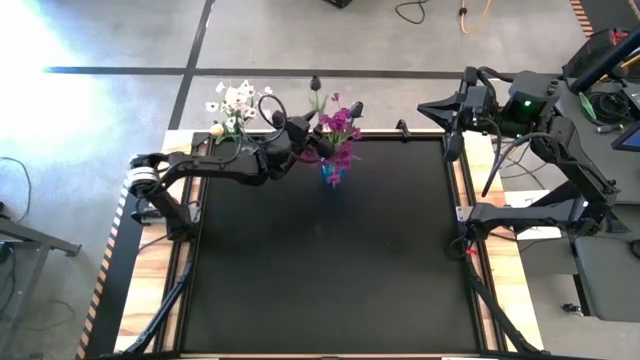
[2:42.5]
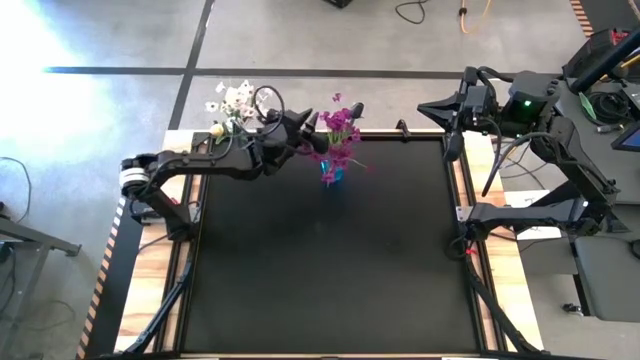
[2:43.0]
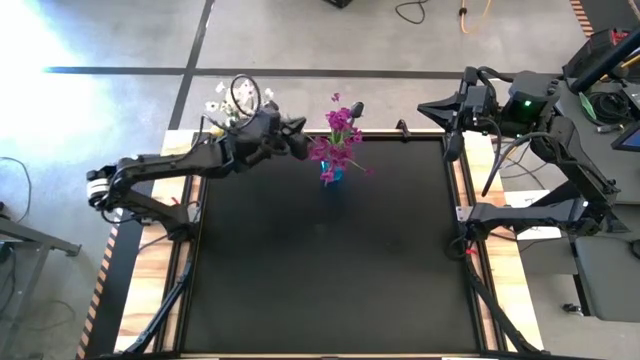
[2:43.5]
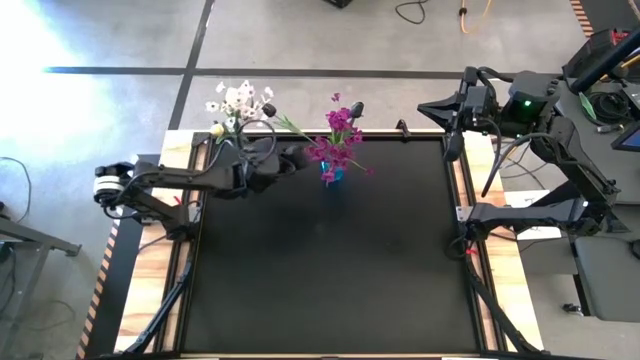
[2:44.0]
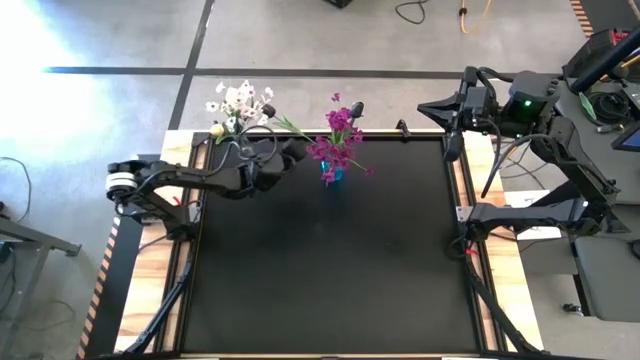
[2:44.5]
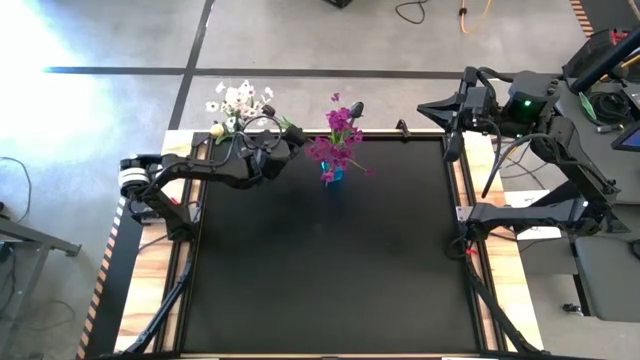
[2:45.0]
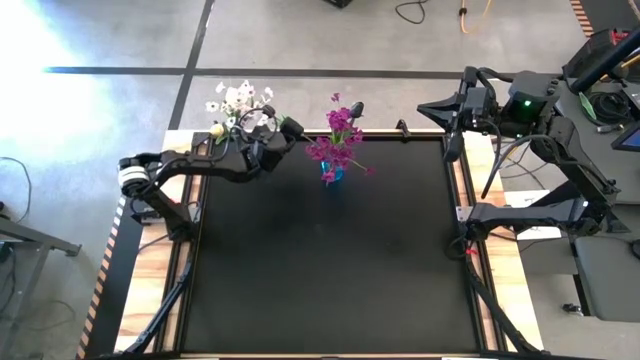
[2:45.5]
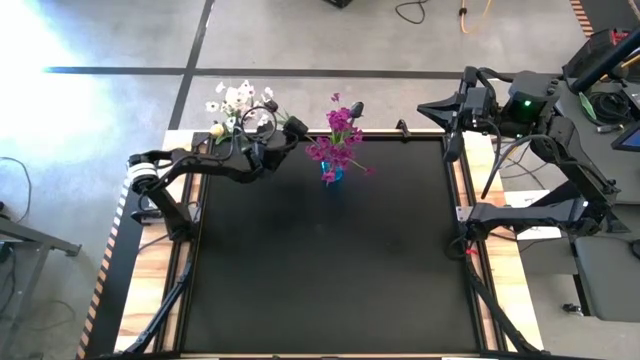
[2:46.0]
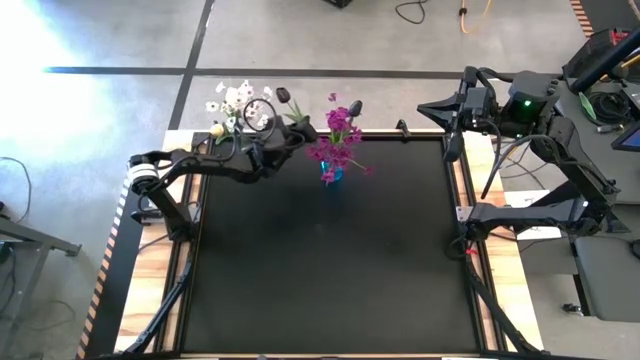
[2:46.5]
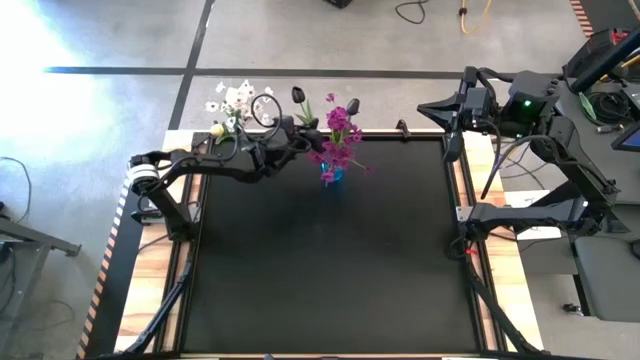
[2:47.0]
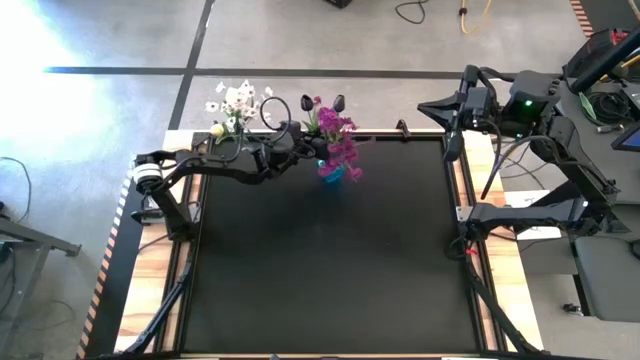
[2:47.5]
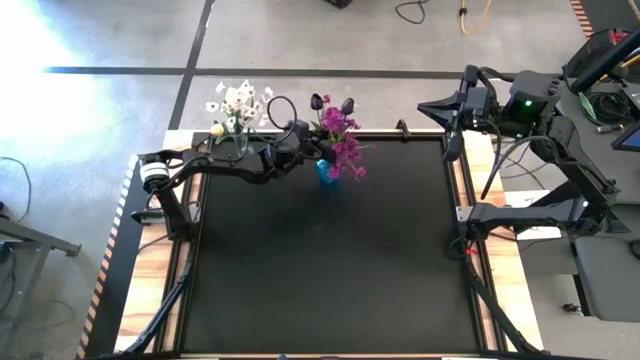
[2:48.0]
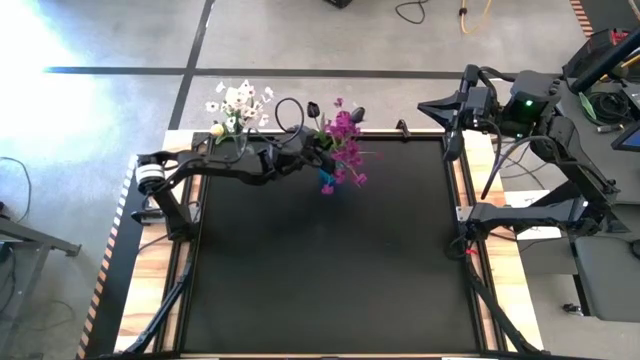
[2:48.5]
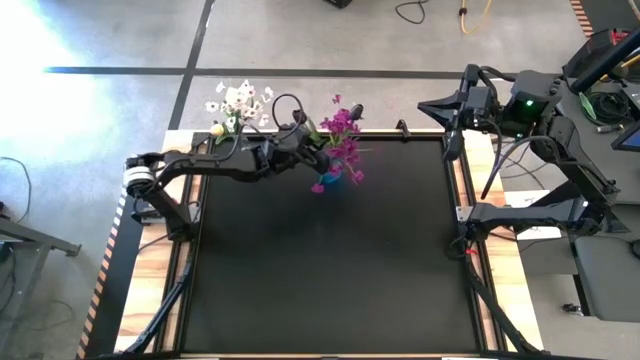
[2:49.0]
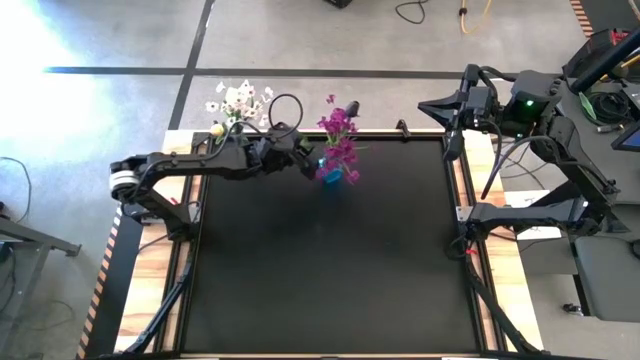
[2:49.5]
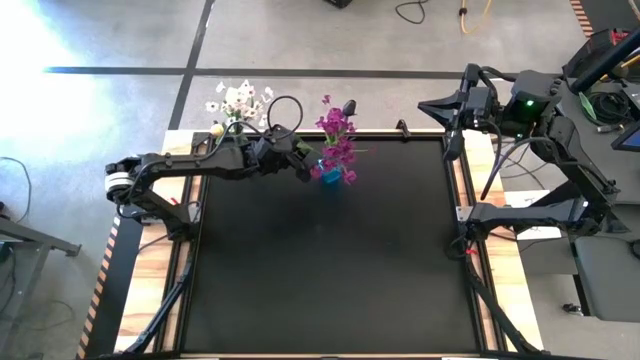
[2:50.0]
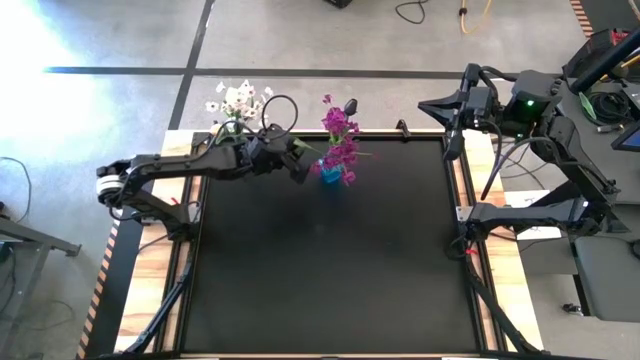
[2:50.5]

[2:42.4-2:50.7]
Task: Sort flowers into vase by color
Put the black flower into the blue vase

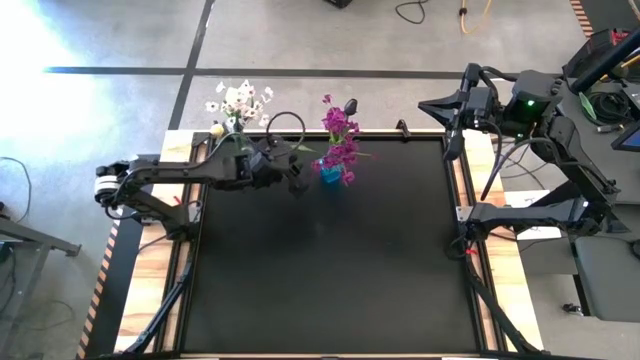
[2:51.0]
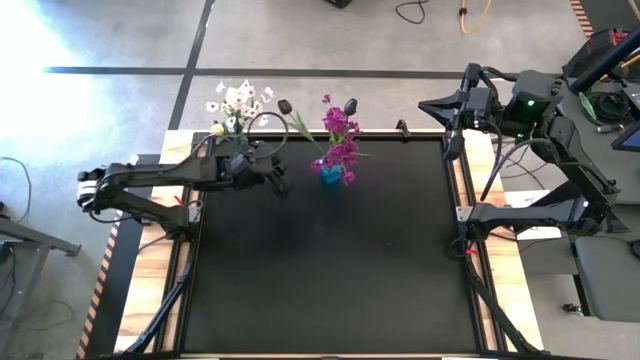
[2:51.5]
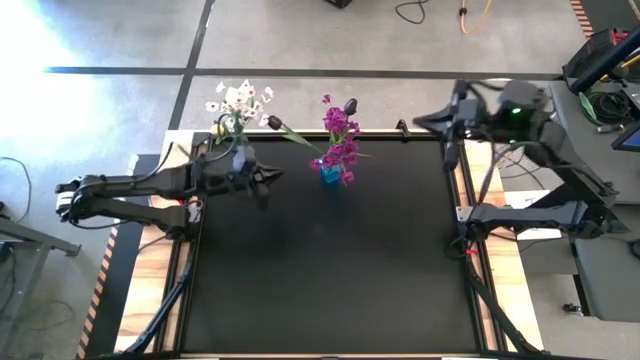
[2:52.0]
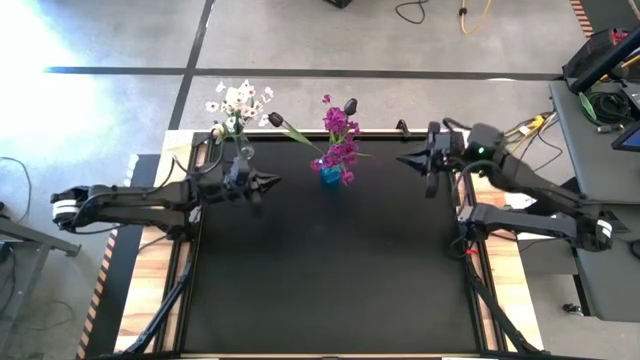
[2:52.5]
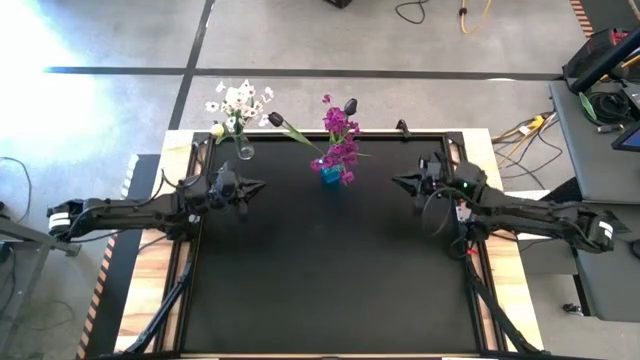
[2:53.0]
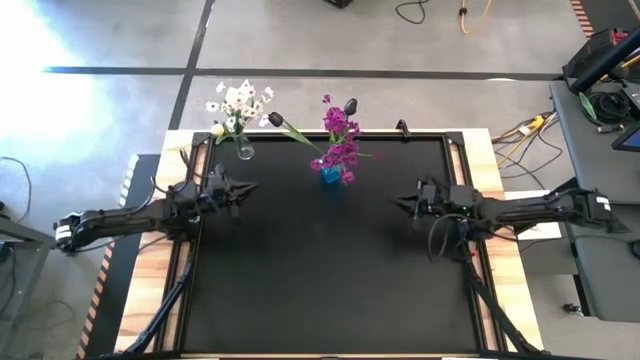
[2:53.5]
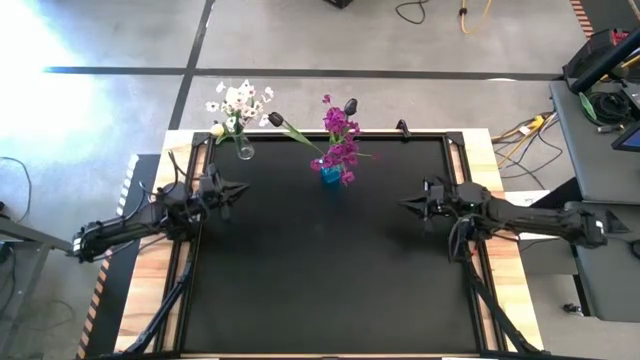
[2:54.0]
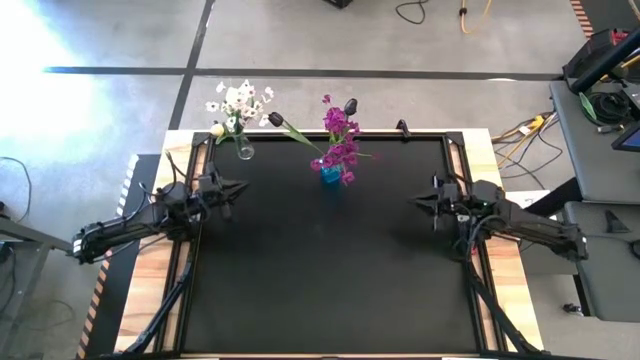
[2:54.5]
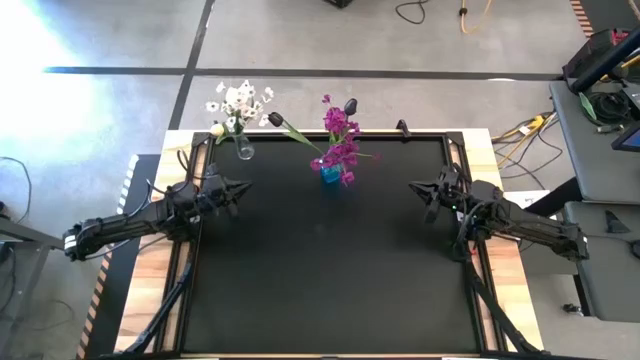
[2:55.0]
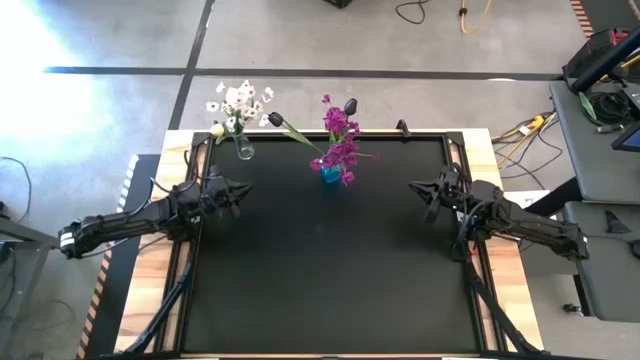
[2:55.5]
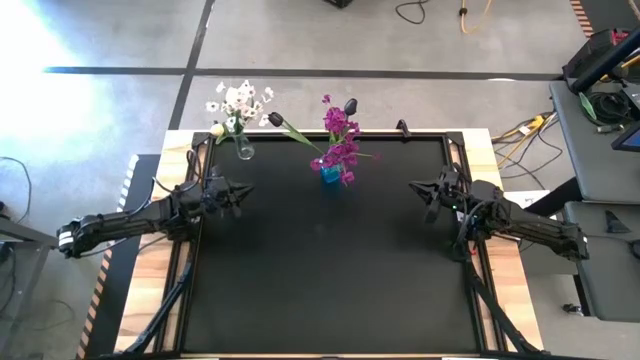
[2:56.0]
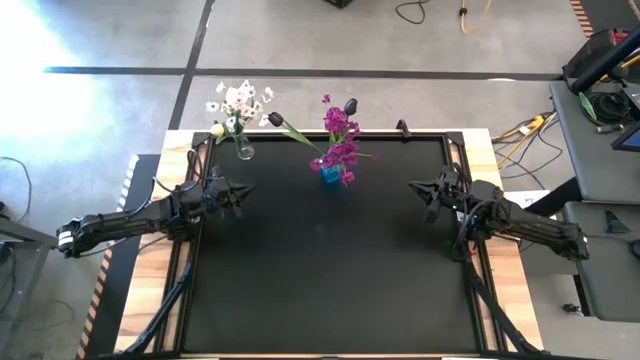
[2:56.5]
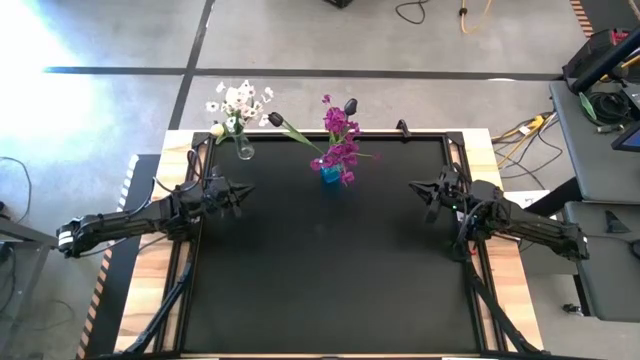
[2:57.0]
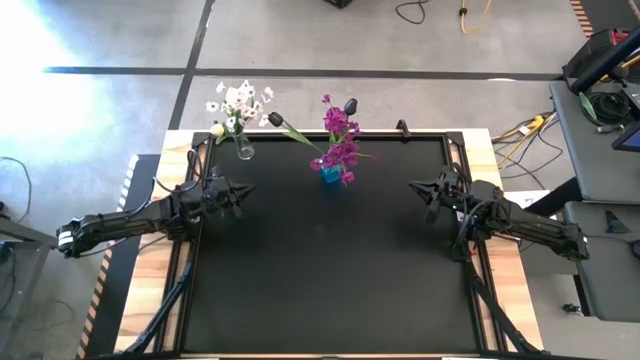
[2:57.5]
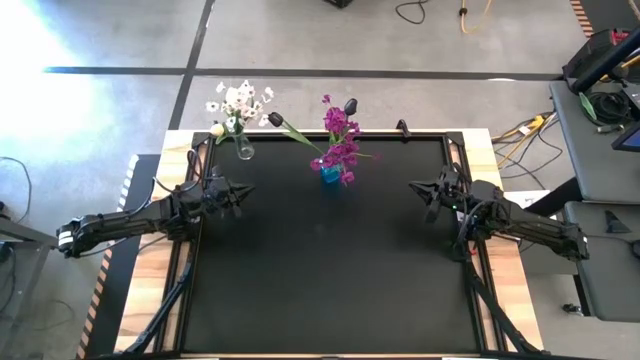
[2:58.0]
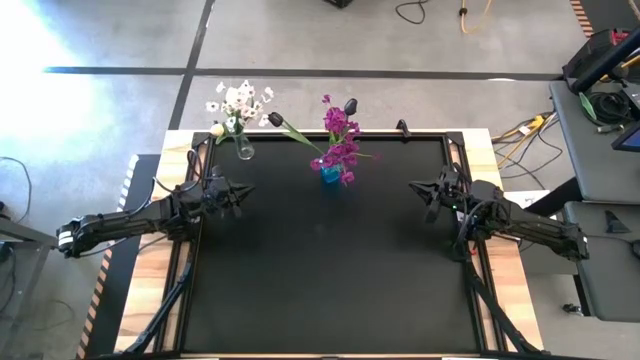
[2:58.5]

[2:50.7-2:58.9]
Return to Home Position
